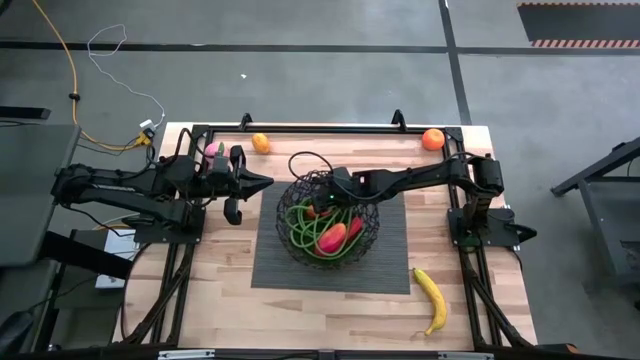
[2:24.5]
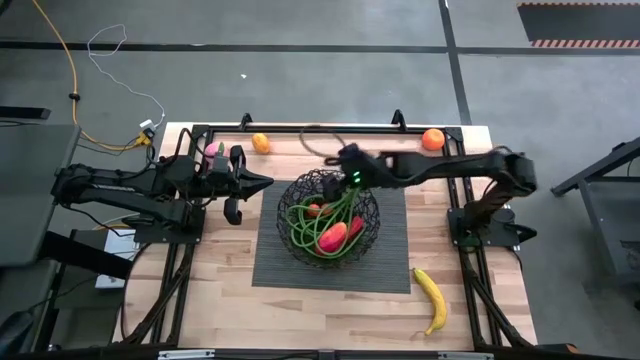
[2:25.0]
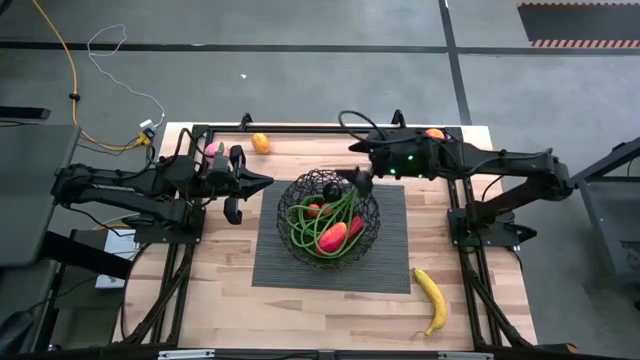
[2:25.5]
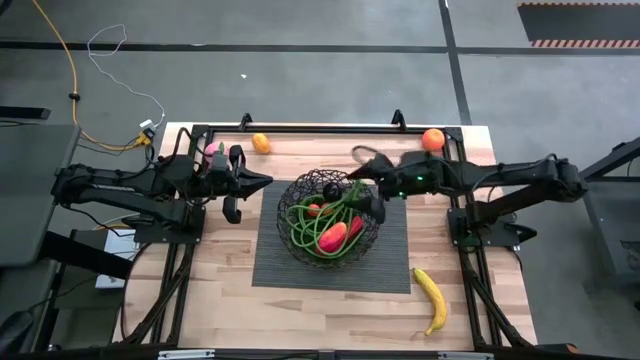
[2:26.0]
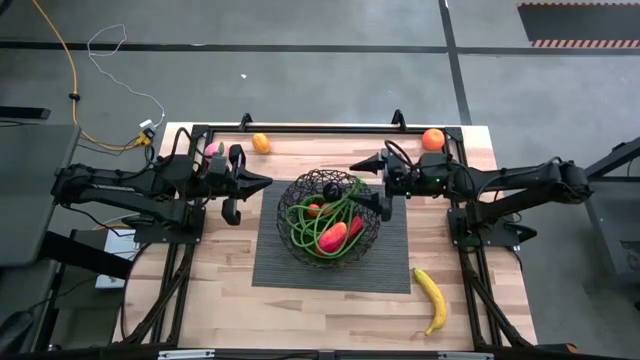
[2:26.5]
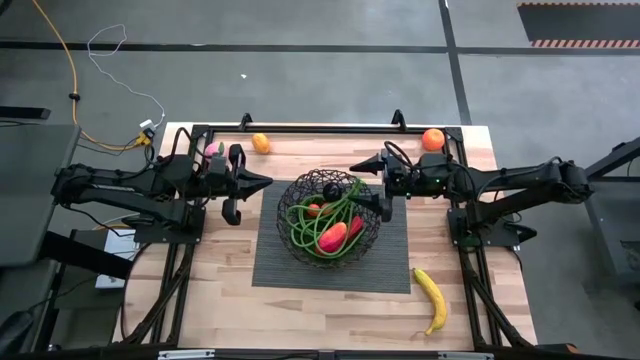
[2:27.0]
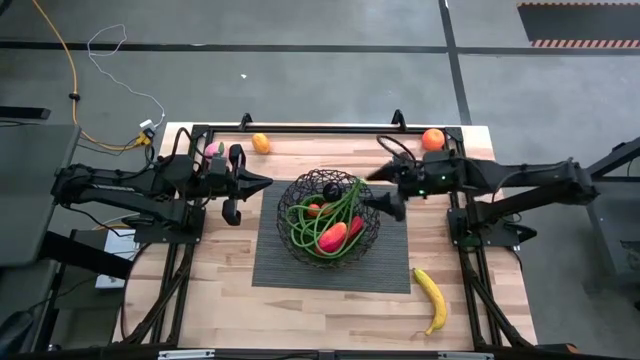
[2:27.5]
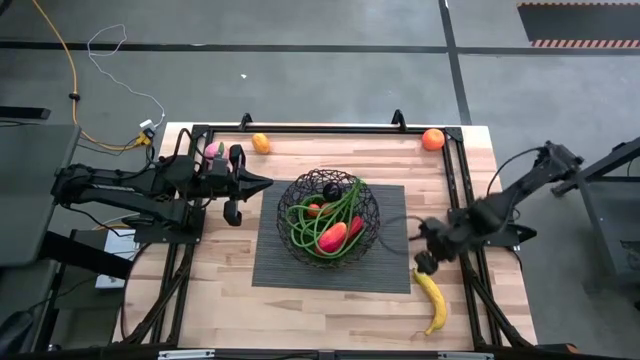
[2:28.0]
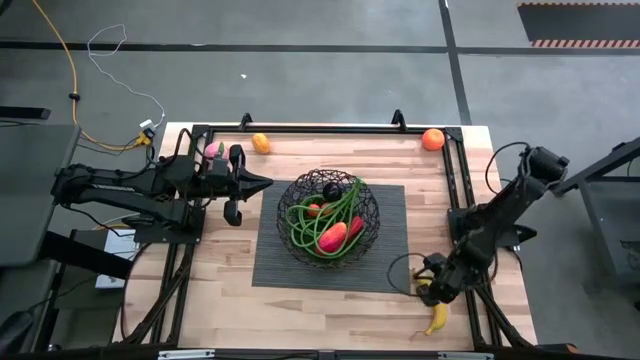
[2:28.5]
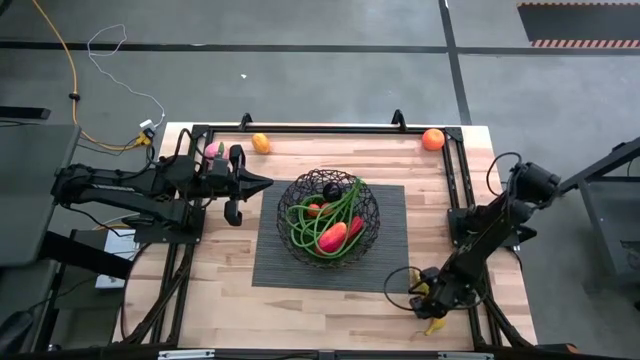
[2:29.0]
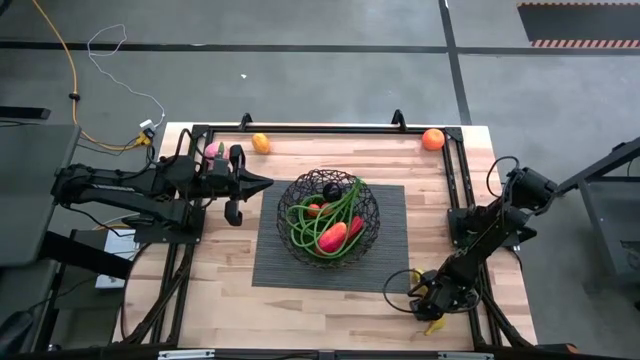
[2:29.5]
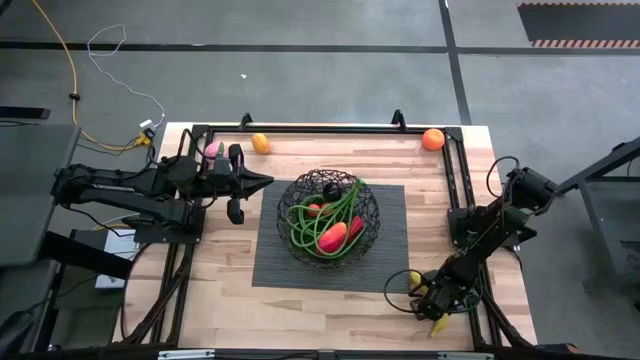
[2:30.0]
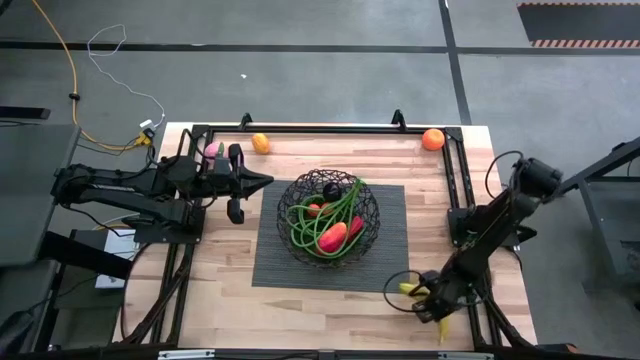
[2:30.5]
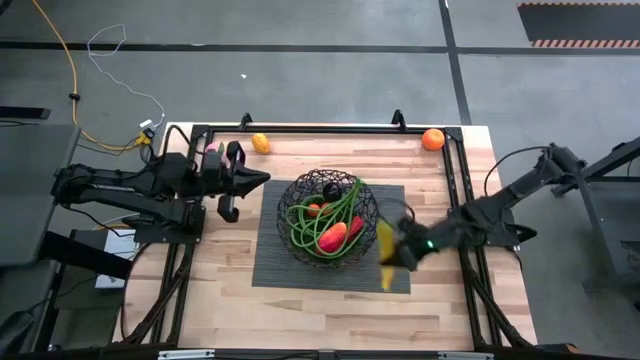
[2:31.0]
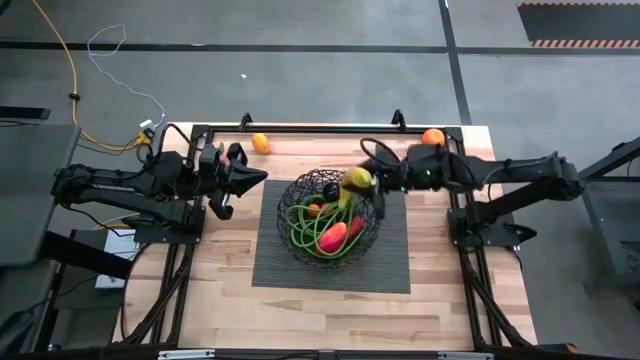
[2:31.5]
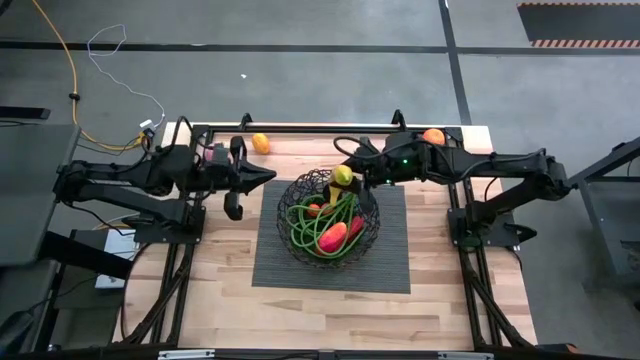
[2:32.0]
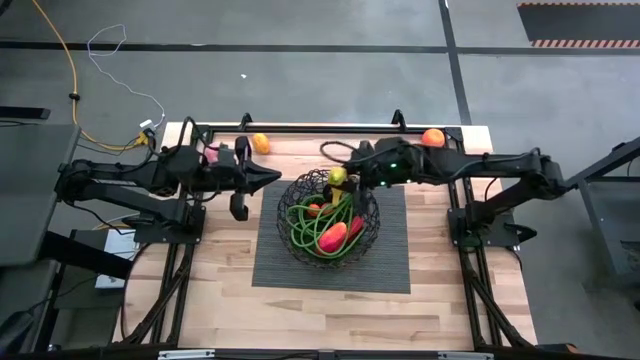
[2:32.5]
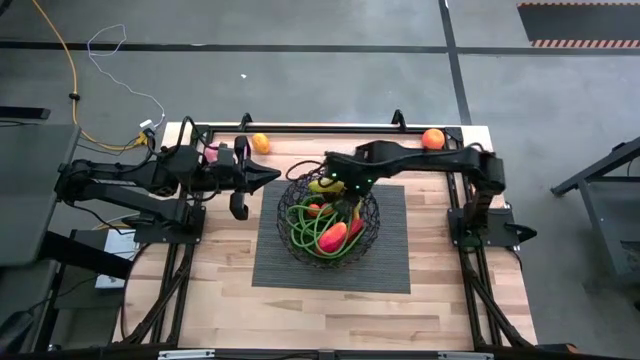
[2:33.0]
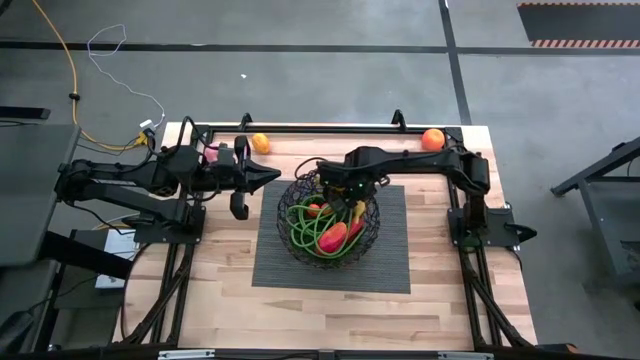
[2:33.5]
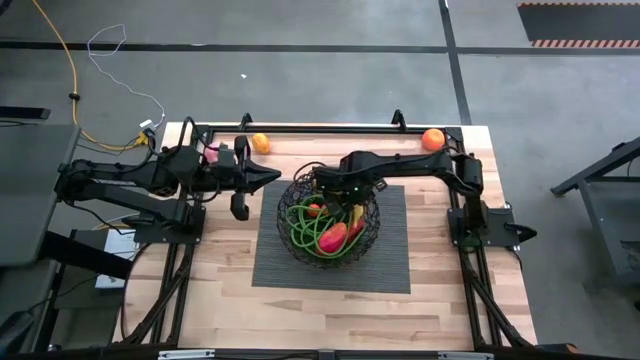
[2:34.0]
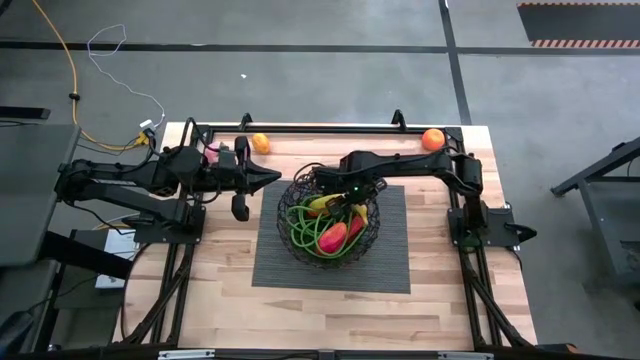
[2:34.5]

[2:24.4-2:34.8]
Task: Build produce basket
Put the yellow banana into the black wire basket

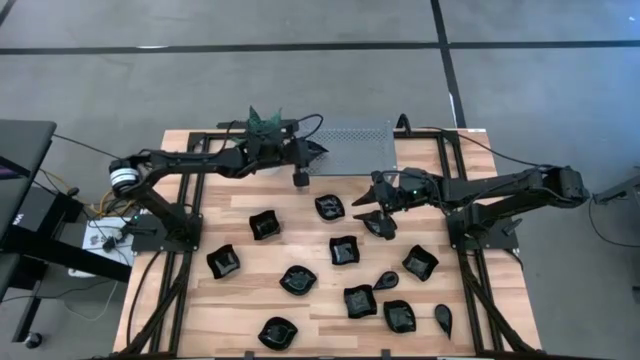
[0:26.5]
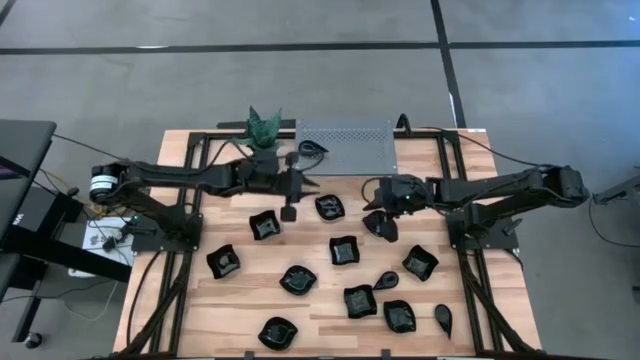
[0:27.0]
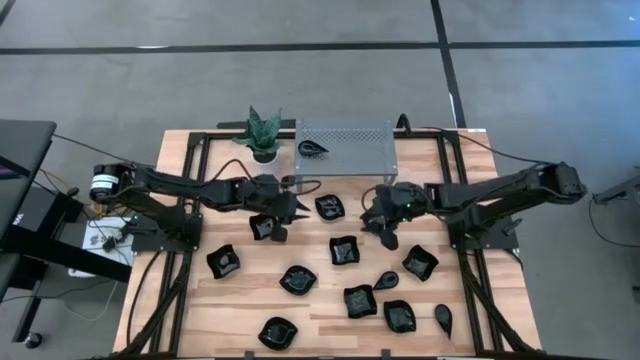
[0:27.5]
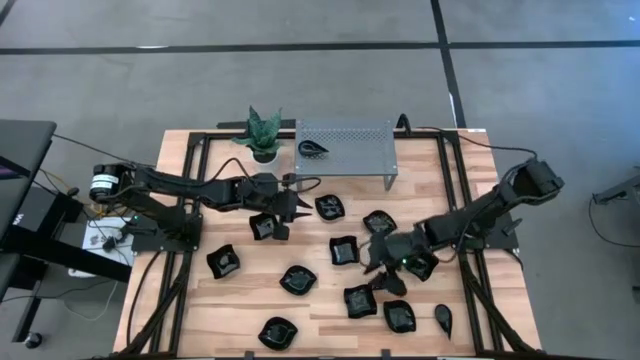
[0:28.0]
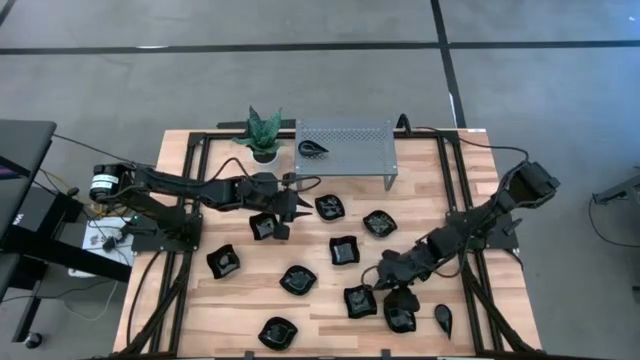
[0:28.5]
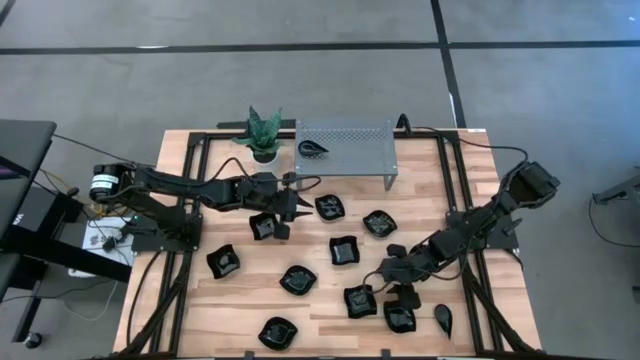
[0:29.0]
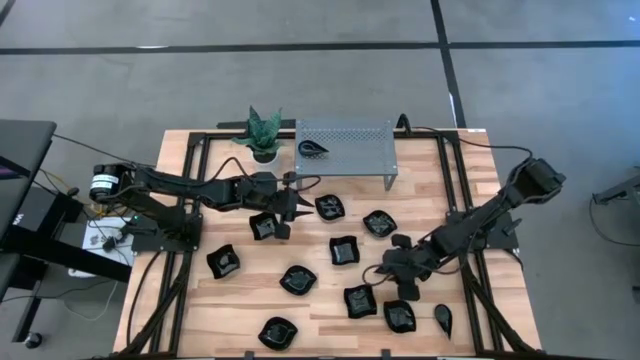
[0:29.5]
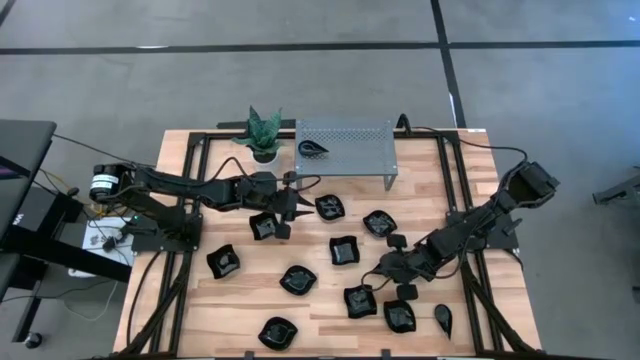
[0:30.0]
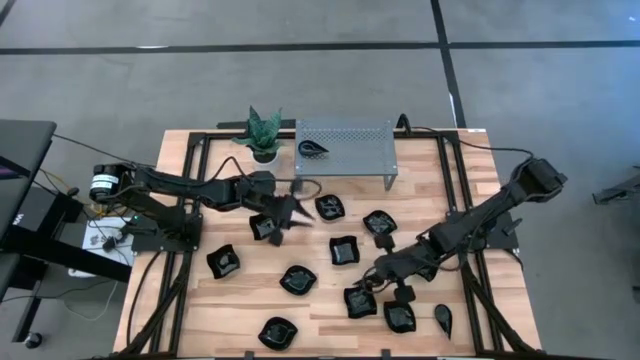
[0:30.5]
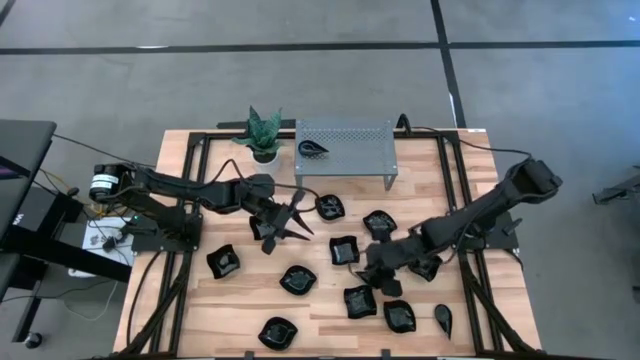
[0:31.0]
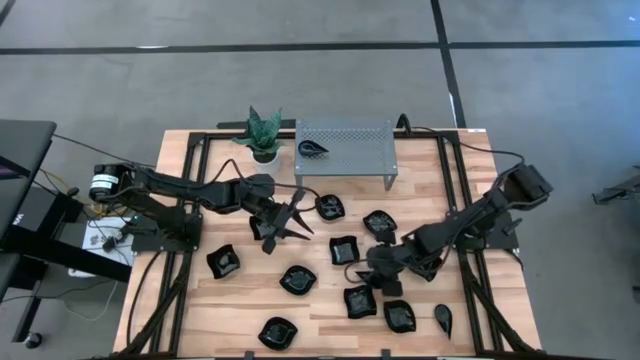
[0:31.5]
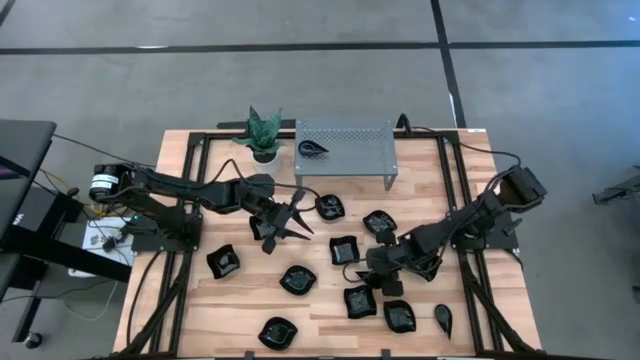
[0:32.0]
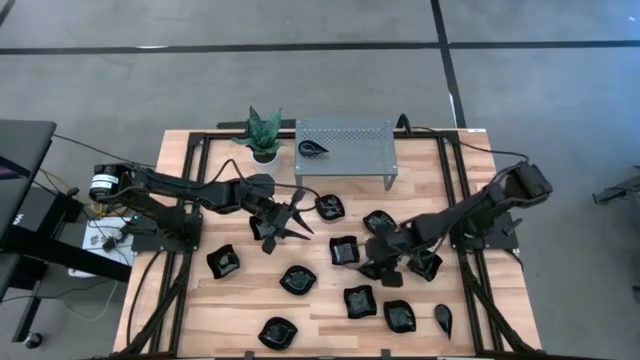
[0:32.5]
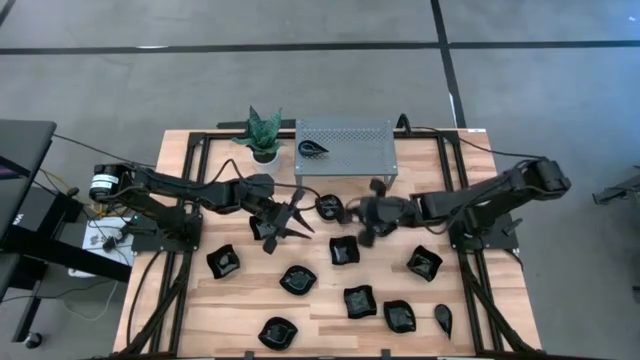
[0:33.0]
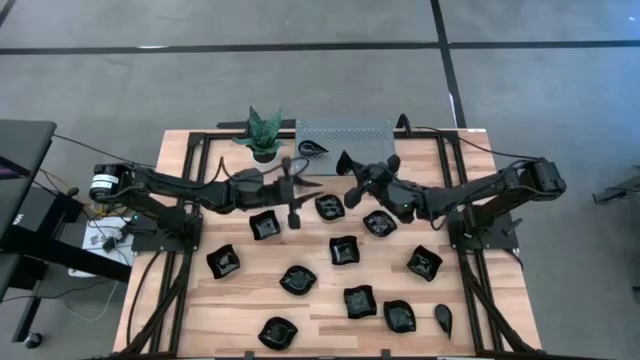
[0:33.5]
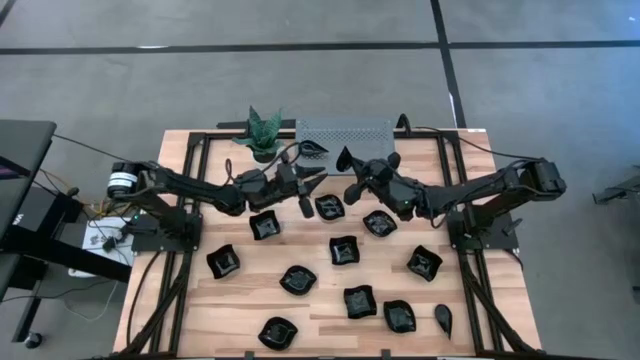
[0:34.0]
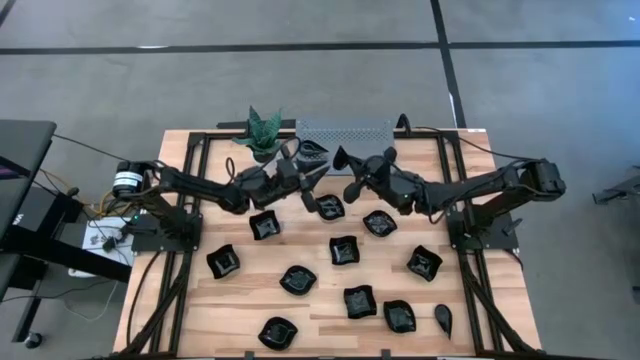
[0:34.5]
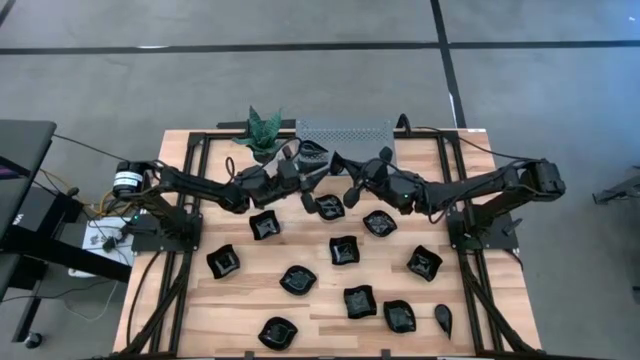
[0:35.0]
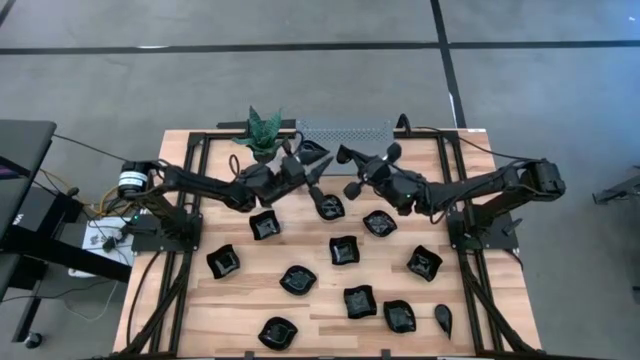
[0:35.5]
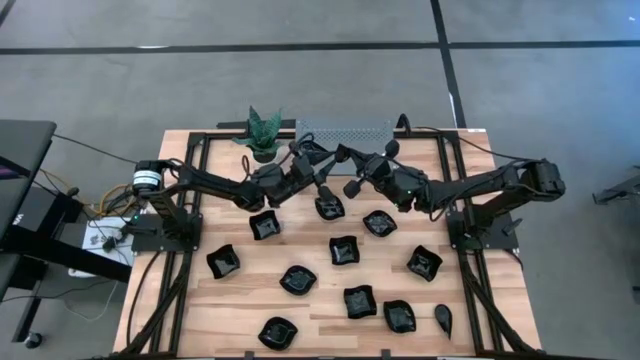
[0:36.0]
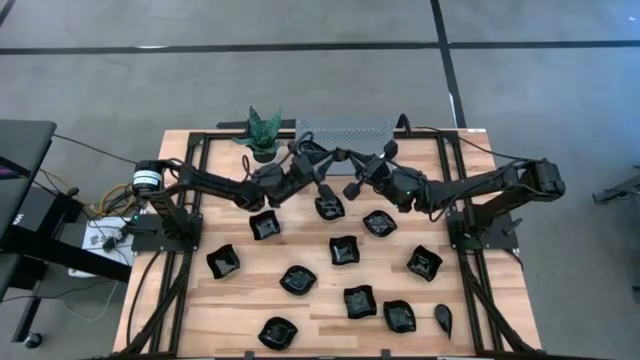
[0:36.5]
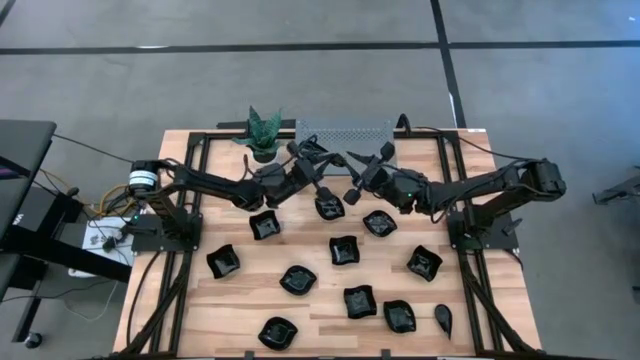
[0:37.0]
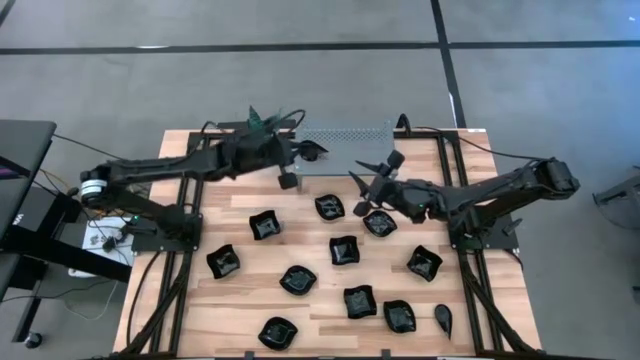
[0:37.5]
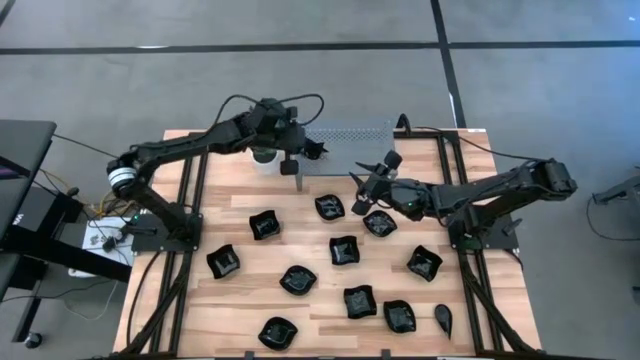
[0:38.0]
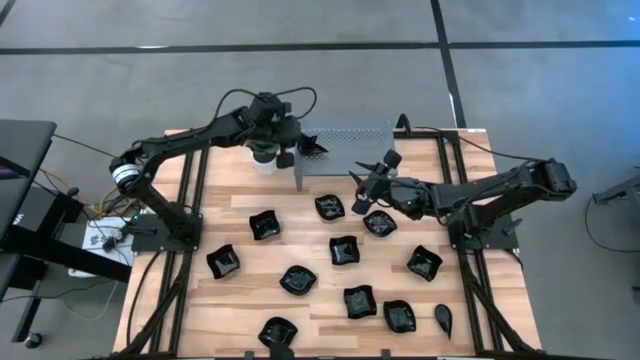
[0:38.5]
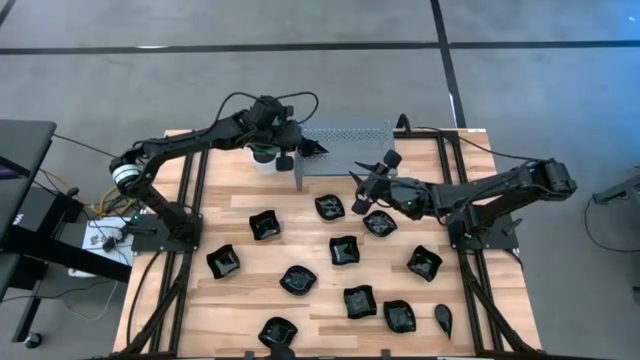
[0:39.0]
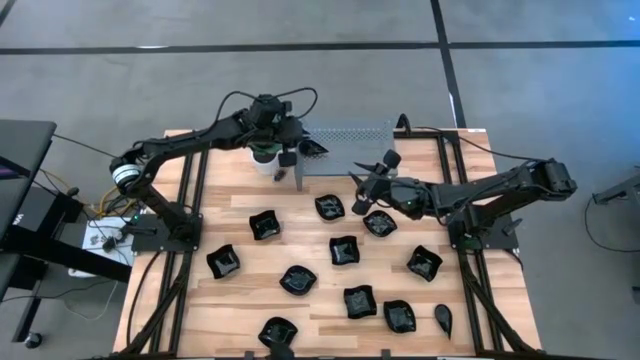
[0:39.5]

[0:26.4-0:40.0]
Task: Pick & Place Mini shaped plates
Stack the top drop-shaped plate on top of the drop-shaped plate on the shelf
